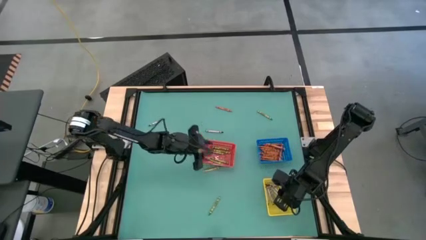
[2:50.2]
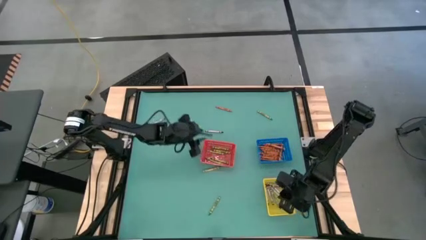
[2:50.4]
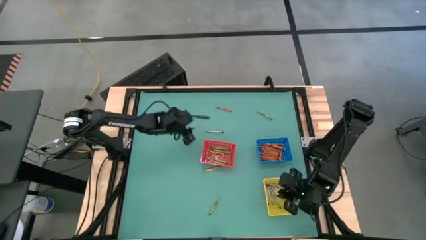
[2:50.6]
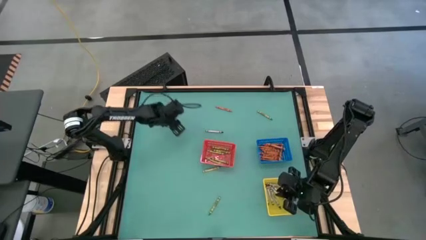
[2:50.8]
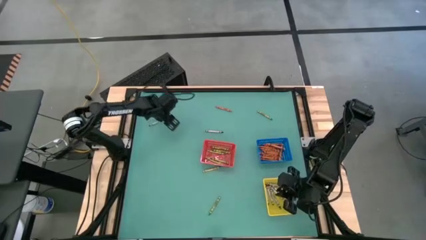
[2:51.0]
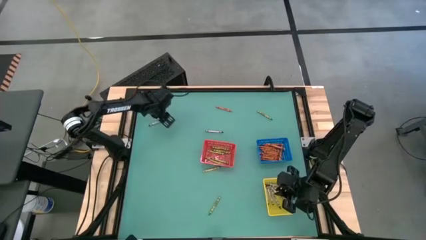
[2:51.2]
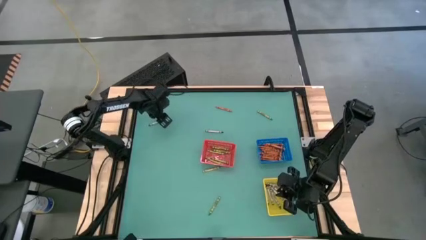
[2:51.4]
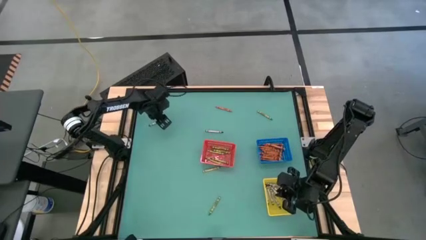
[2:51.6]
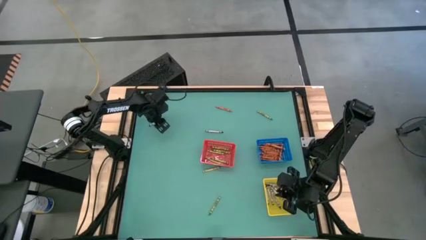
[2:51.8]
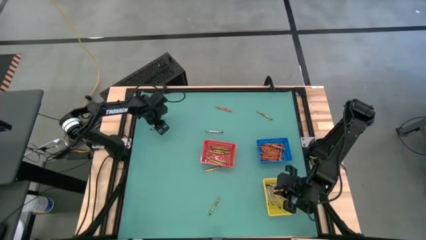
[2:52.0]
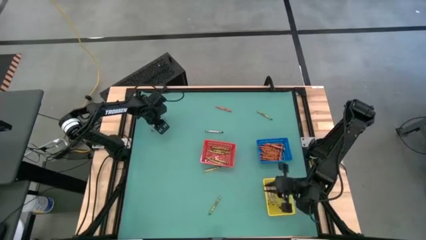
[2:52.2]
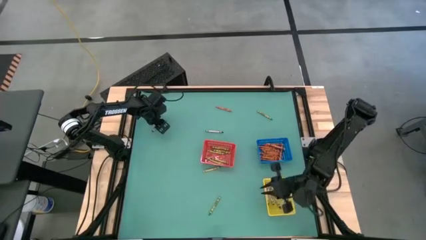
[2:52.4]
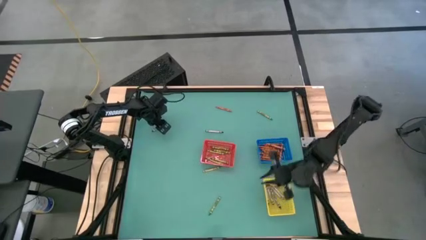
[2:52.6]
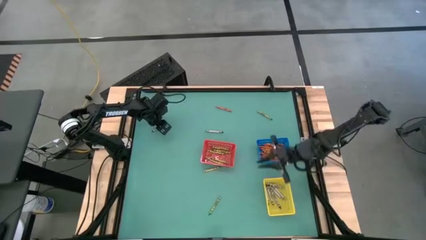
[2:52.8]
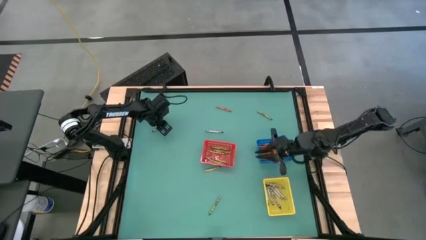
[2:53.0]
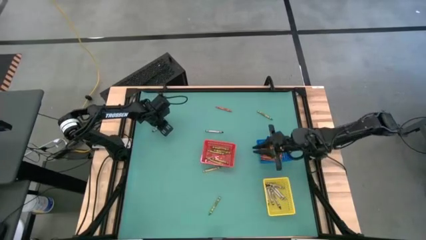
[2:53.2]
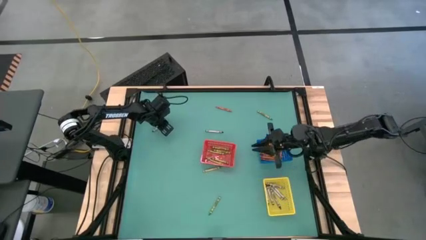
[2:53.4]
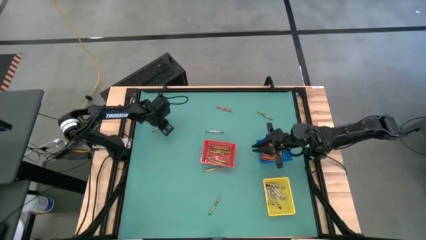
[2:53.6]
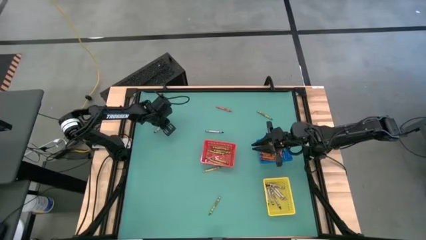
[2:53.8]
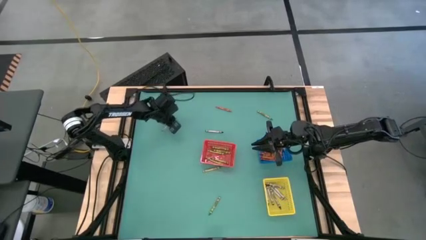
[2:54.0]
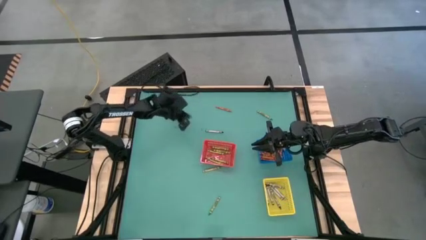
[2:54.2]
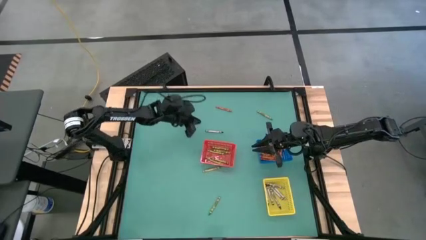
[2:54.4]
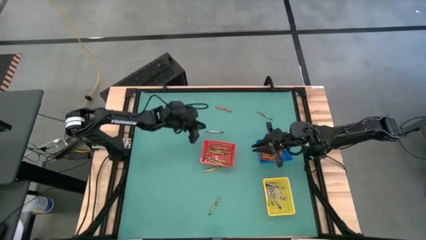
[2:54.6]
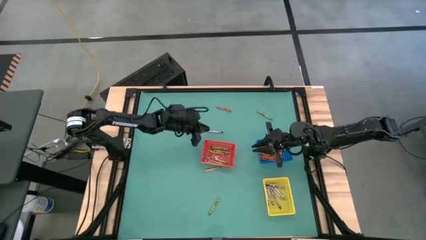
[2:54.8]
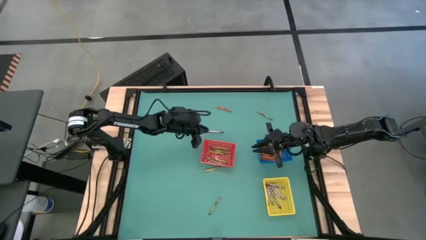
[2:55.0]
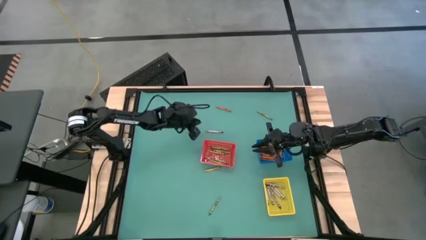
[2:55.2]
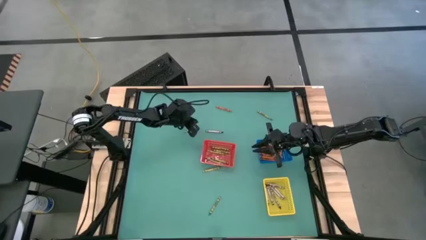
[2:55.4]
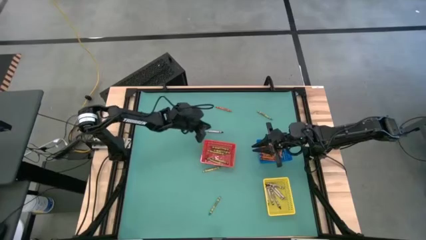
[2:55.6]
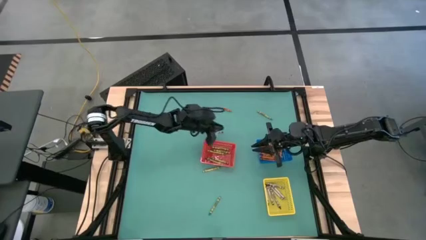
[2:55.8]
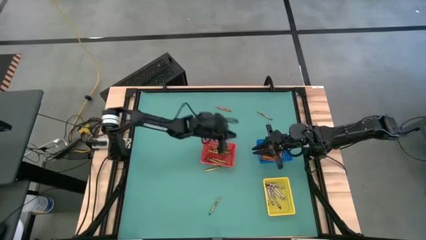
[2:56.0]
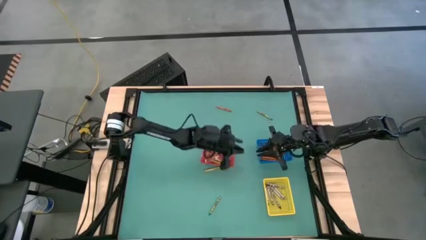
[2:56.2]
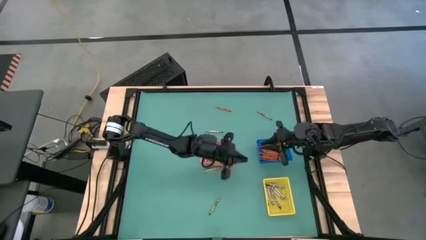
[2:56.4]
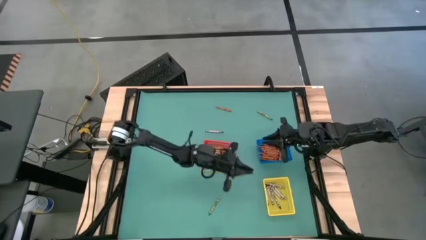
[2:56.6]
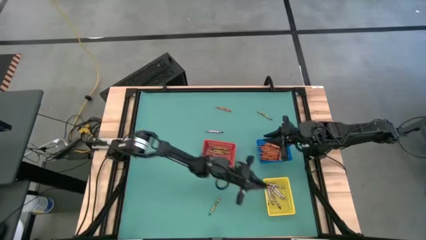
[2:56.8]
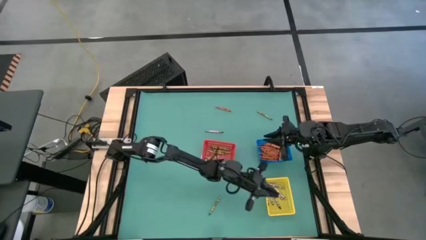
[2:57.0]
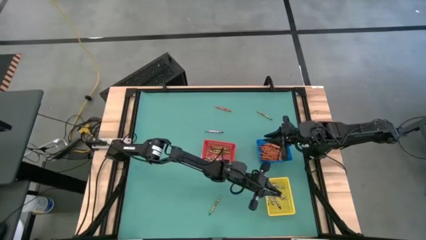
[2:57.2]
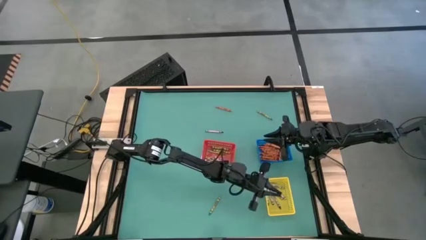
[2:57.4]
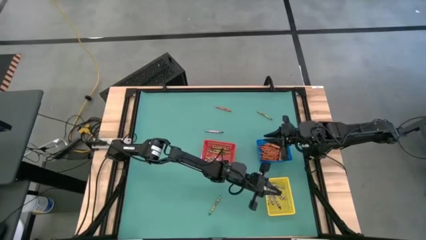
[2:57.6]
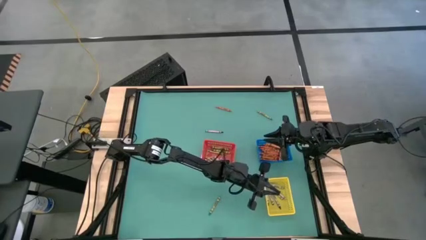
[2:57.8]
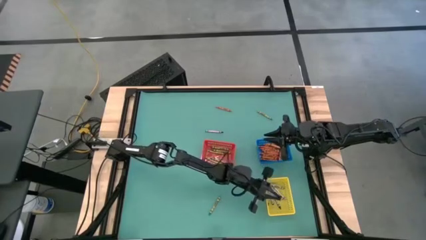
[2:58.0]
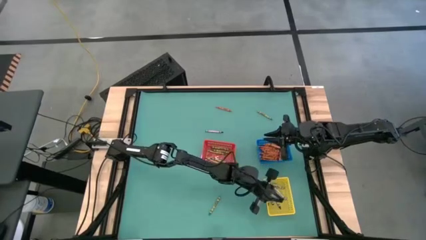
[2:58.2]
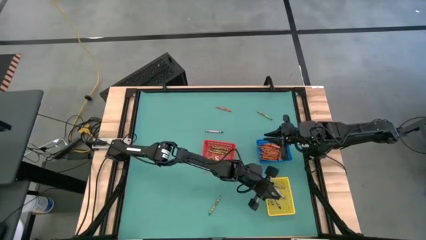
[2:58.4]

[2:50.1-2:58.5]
Task: Sort crayons
Put the black crayon into the yellow basket

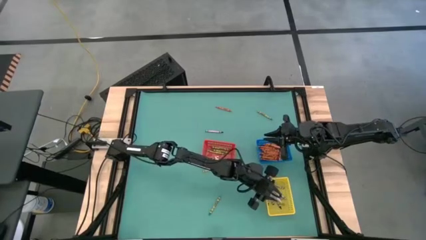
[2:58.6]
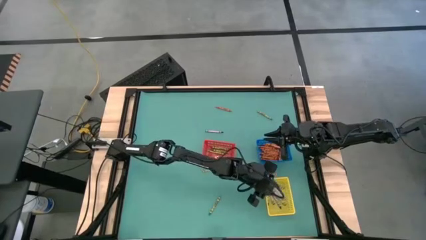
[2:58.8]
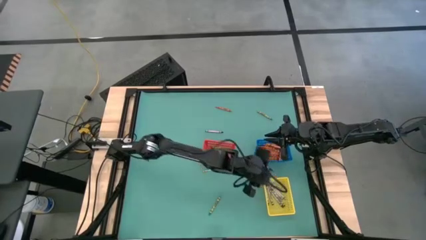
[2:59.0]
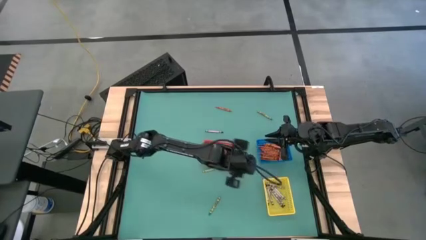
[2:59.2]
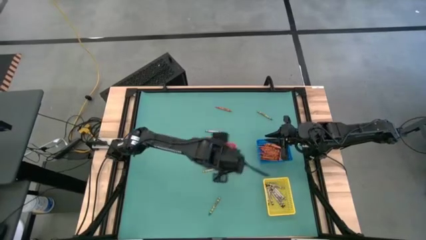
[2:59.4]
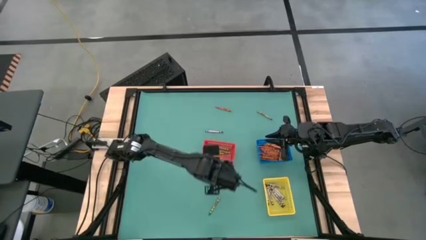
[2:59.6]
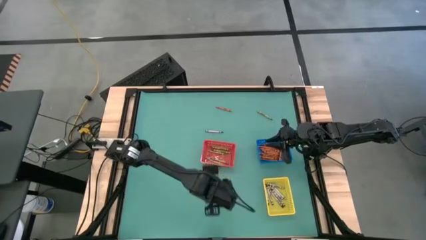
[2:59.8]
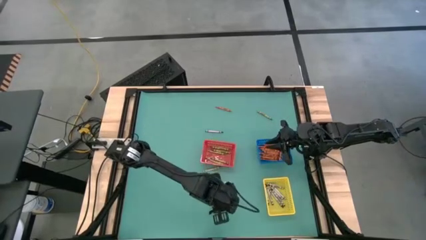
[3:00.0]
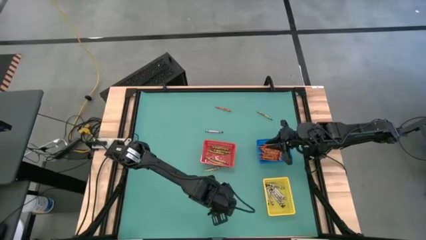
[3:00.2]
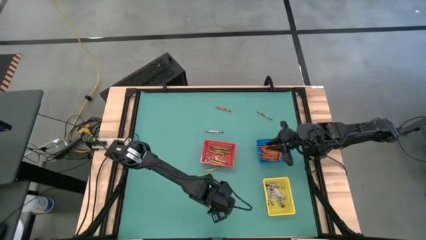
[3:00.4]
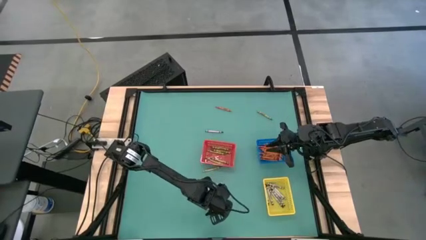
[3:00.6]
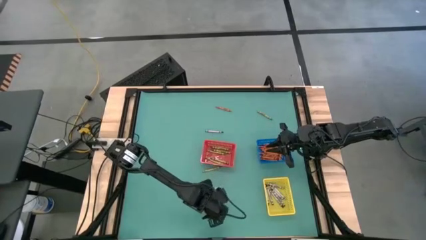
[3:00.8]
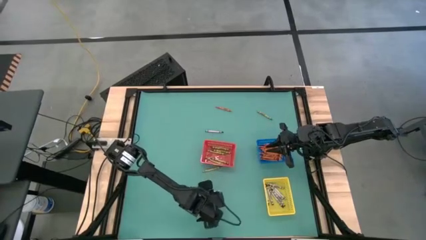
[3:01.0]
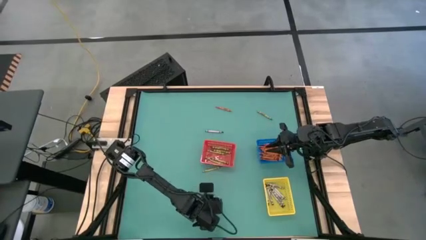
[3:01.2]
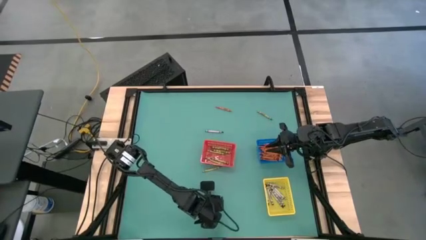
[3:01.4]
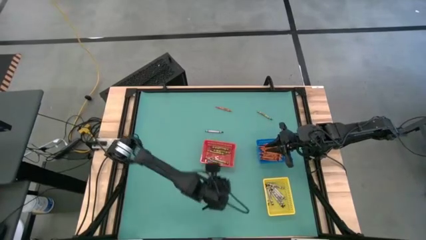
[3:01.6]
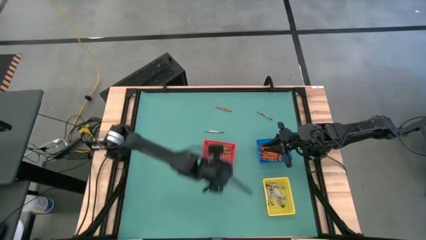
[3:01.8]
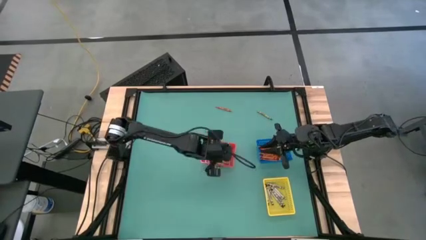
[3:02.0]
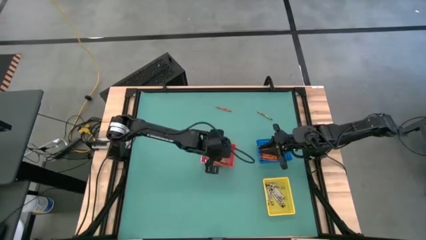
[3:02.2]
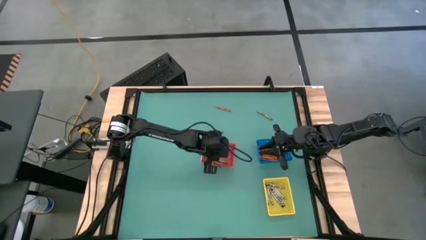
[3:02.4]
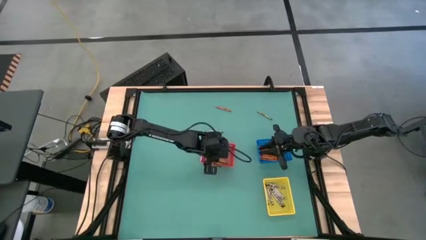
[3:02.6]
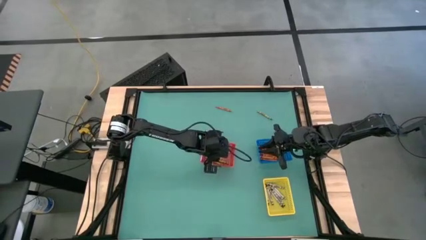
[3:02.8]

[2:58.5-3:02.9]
Put the green crayon into the red basket

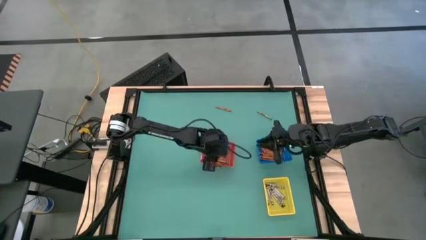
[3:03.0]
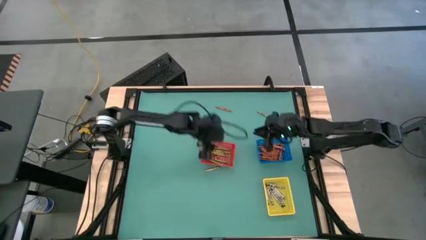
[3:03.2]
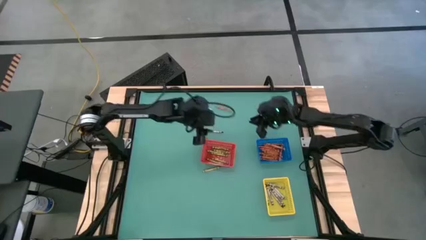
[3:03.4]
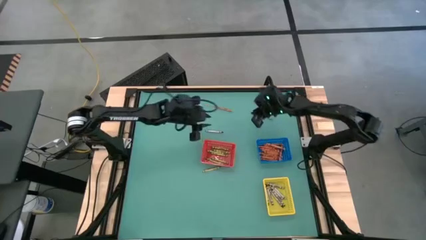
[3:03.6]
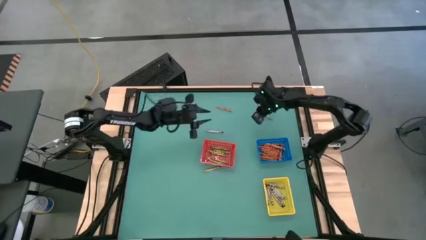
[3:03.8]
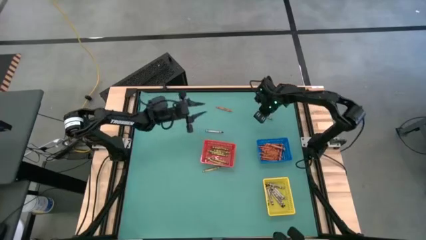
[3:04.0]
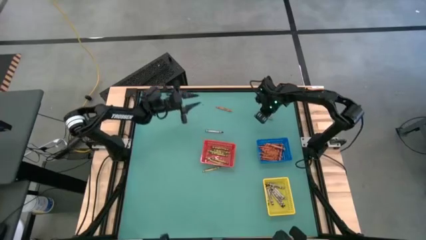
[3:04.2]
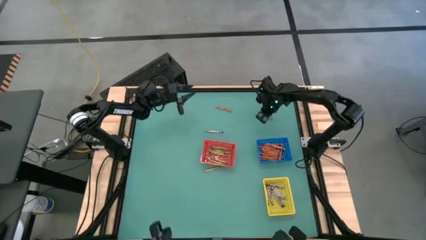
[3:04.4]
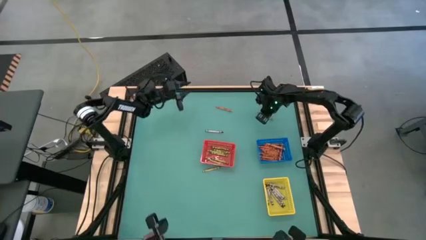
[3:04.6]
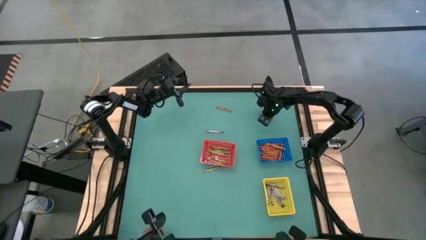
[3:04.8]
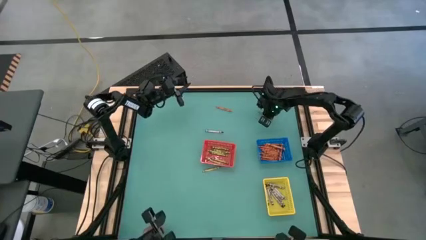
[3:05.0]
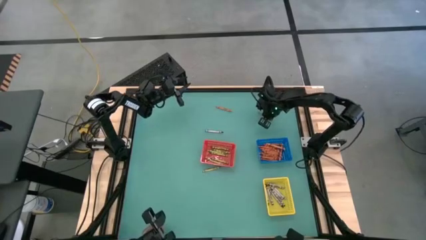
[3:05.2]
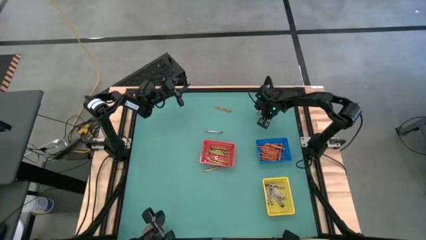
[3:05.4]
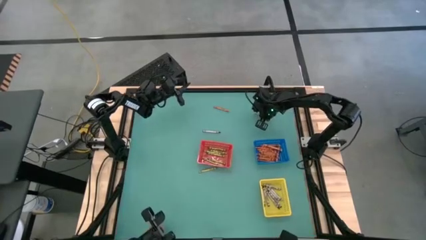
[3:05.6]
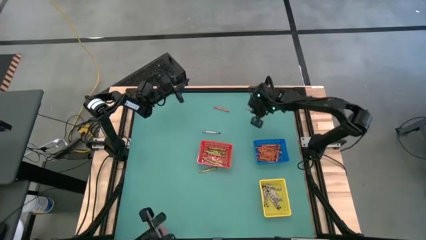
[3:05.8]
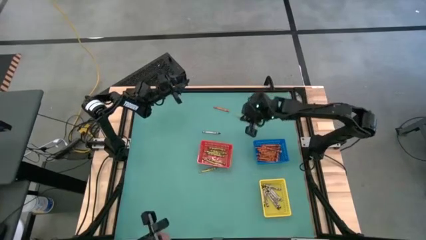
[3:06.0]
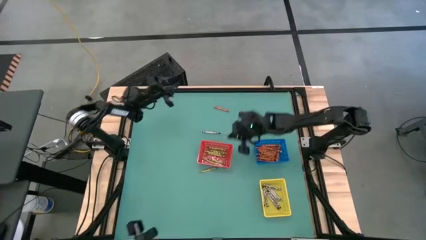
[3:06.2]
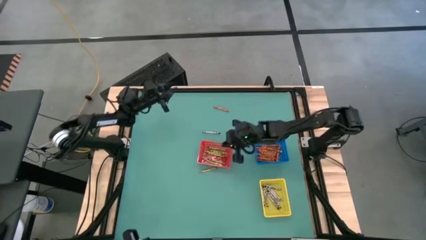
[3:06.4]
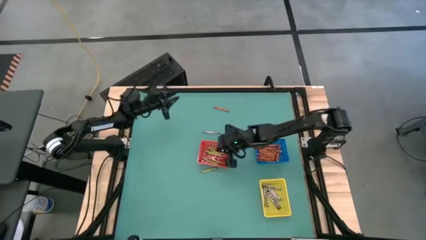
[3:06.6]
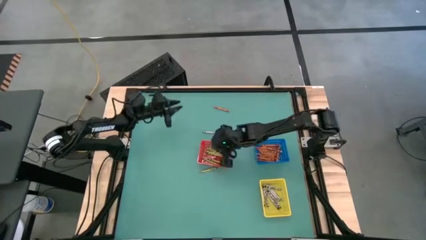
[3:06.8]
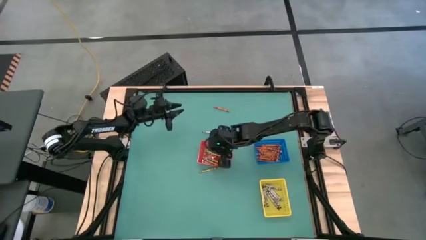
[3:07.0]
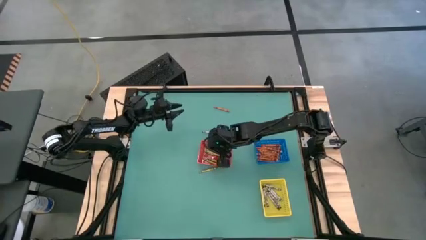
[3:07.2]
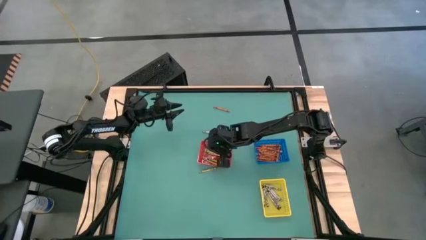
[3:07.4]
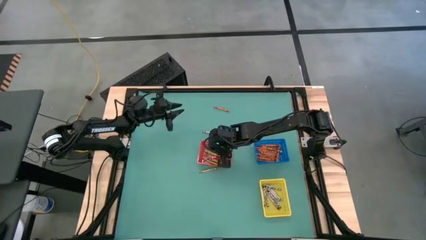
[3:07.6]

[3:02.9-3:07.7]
Put the green crayon into the red basket
